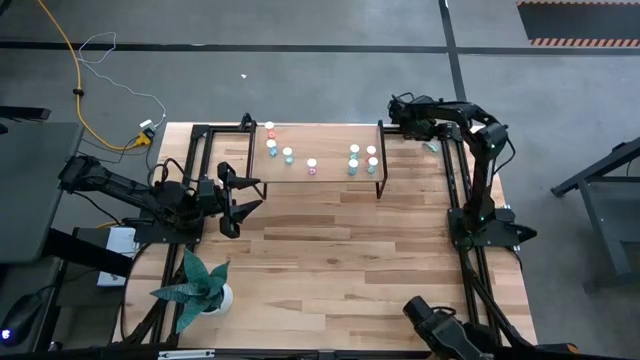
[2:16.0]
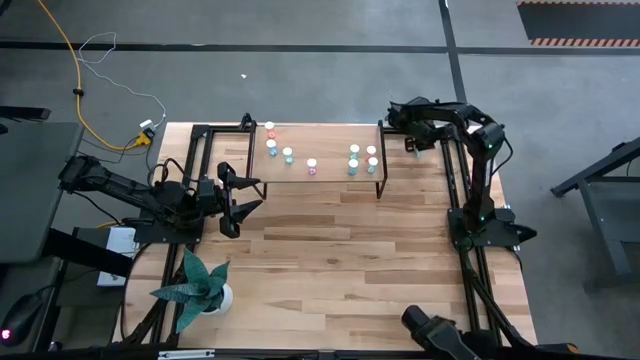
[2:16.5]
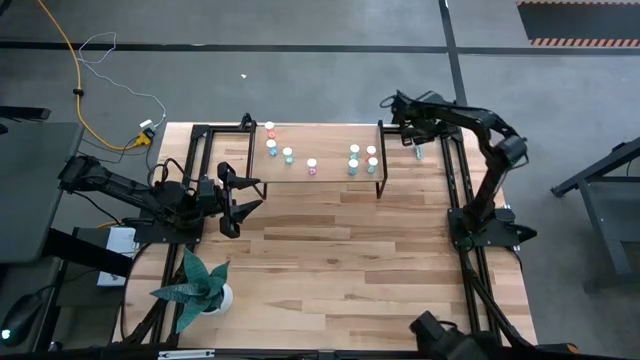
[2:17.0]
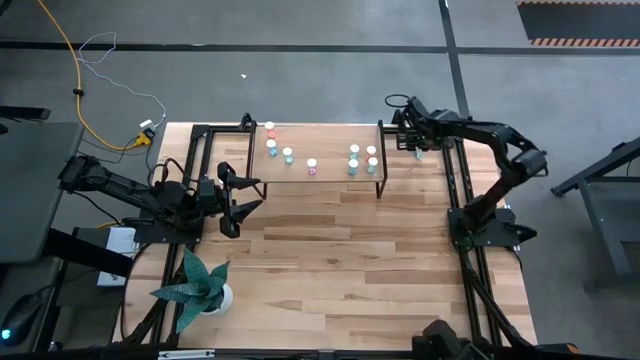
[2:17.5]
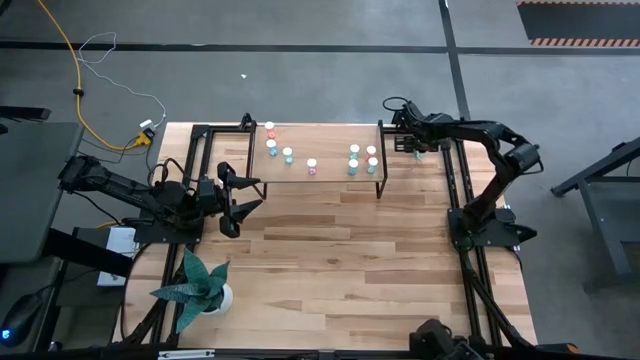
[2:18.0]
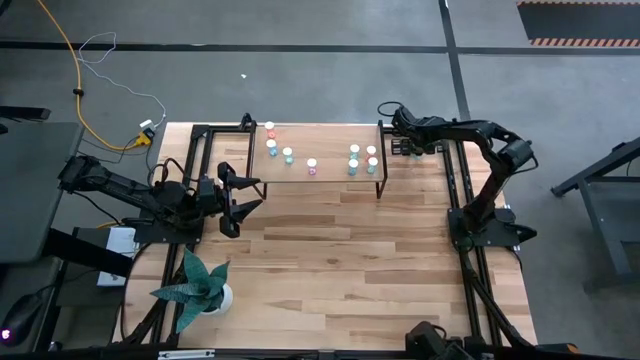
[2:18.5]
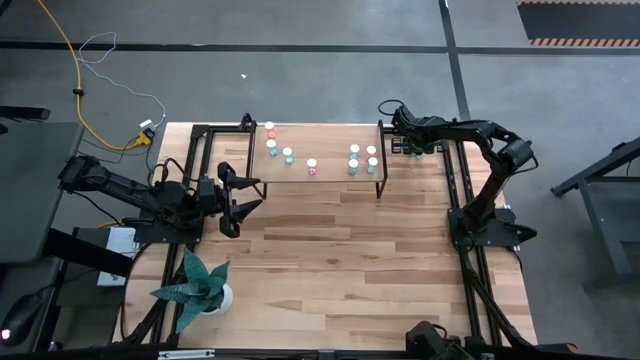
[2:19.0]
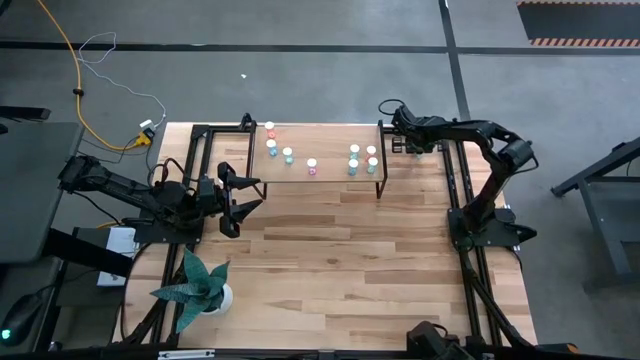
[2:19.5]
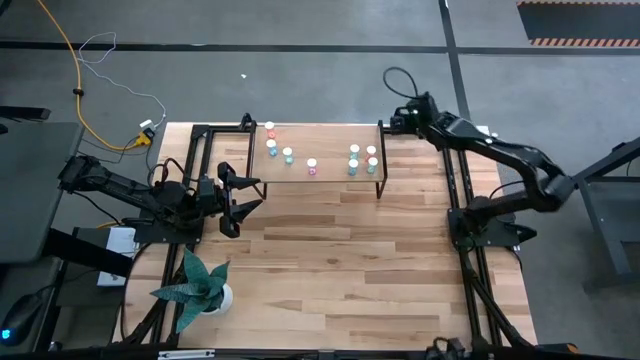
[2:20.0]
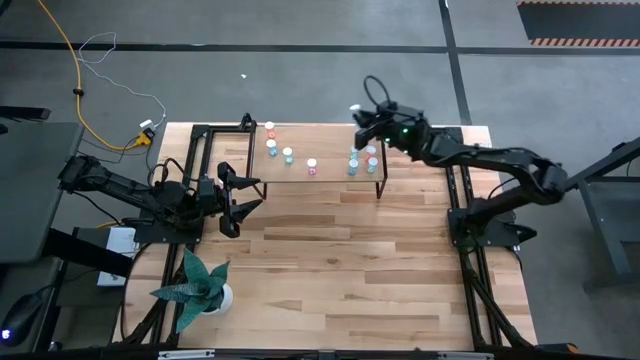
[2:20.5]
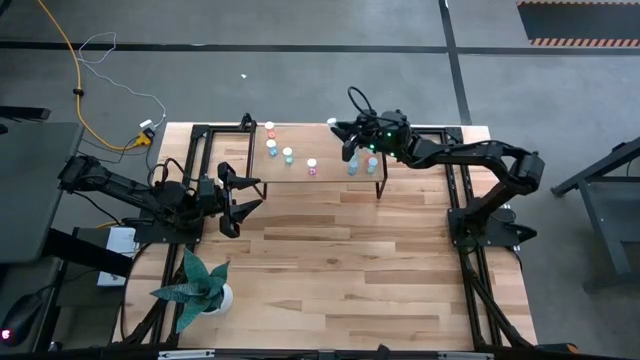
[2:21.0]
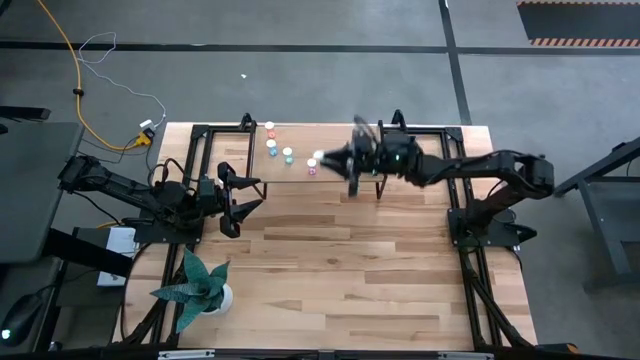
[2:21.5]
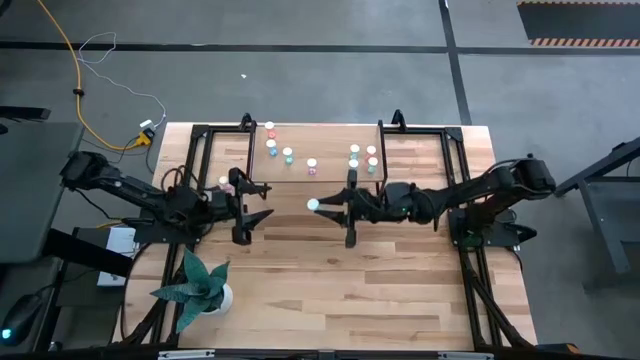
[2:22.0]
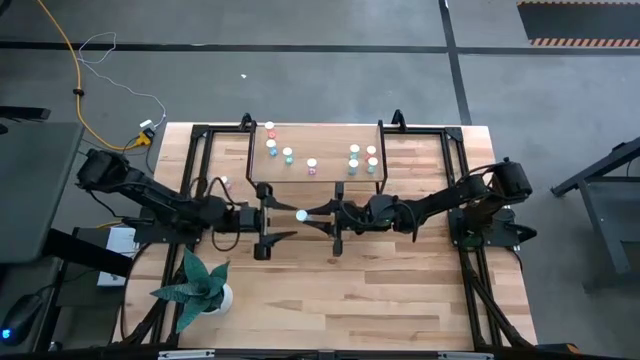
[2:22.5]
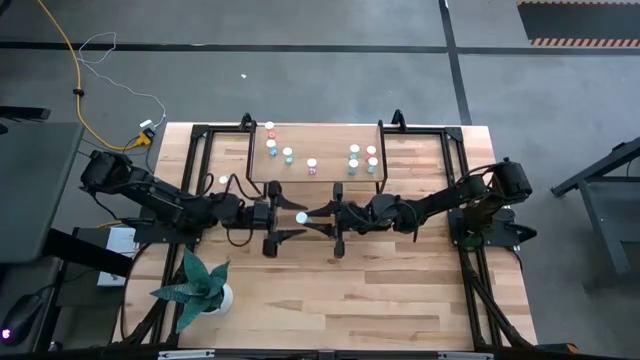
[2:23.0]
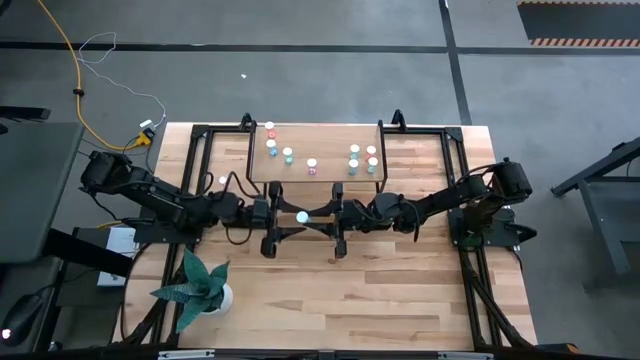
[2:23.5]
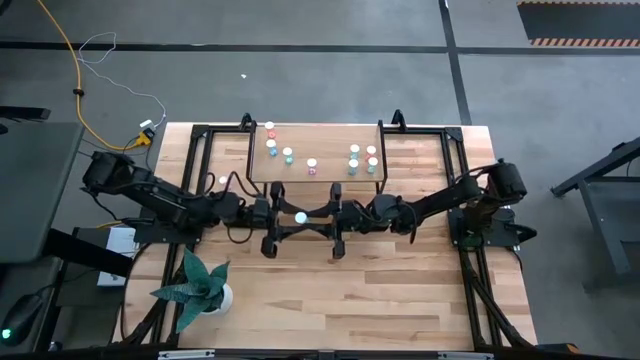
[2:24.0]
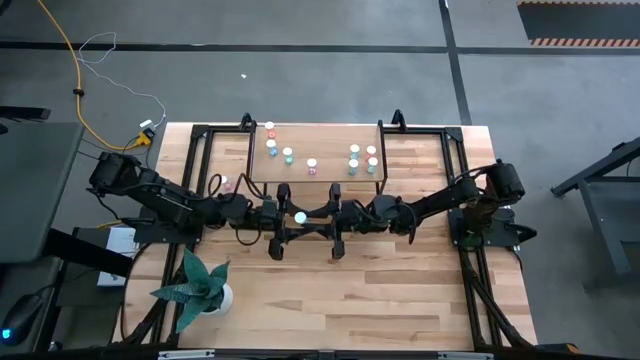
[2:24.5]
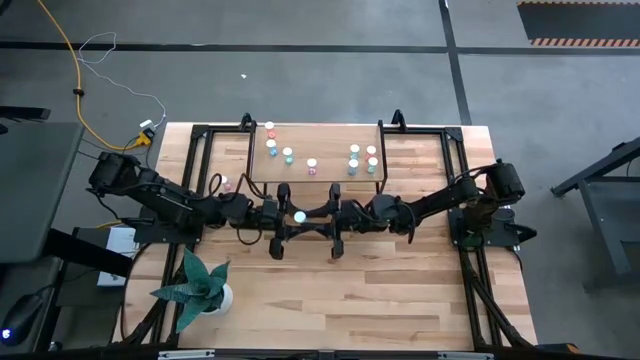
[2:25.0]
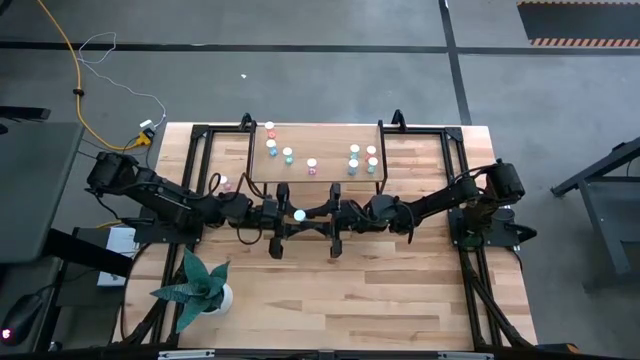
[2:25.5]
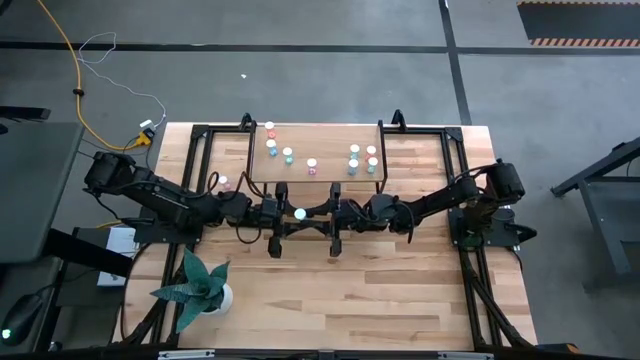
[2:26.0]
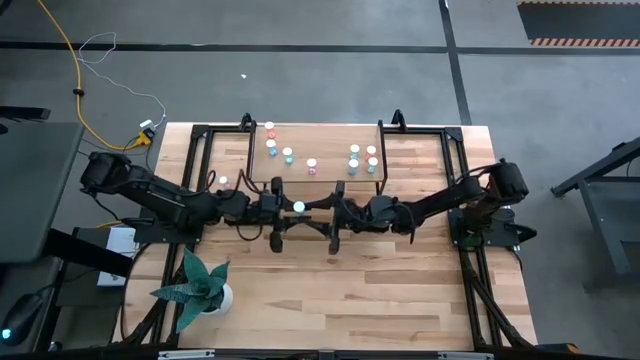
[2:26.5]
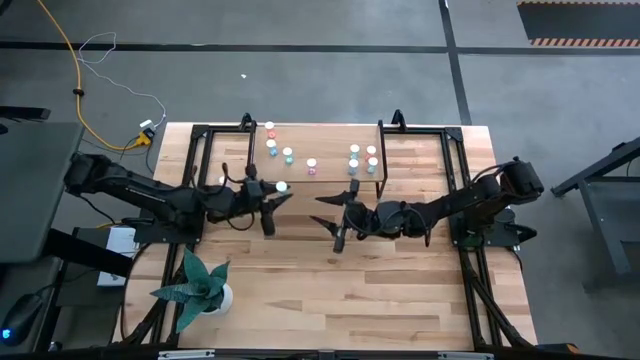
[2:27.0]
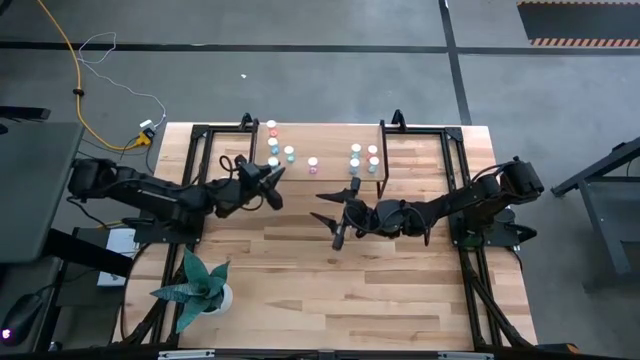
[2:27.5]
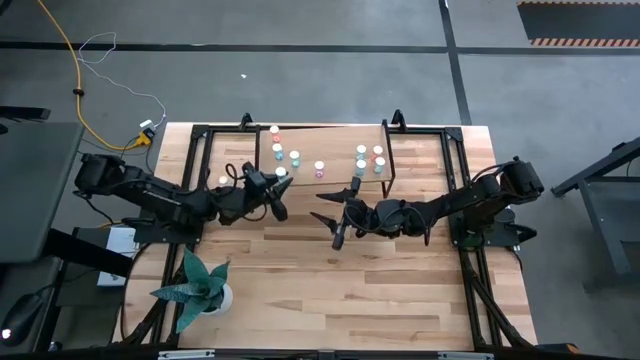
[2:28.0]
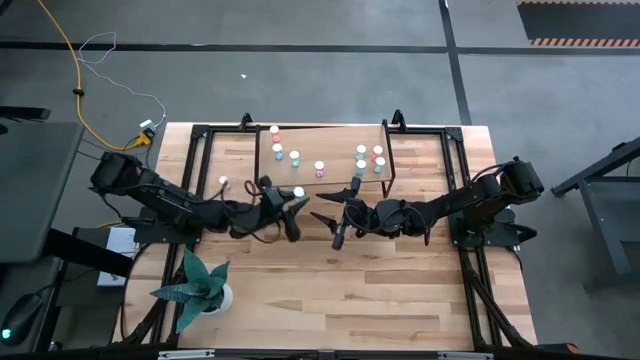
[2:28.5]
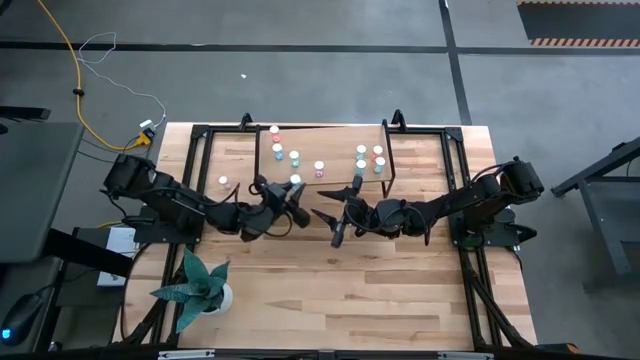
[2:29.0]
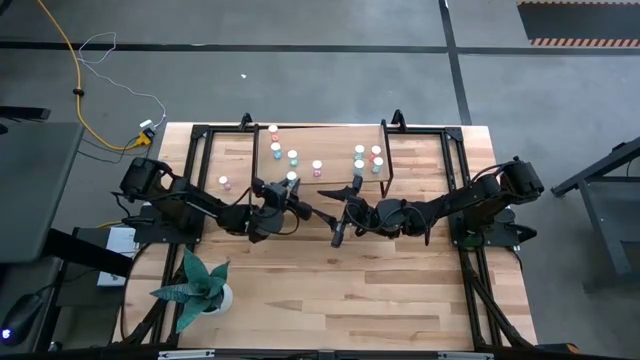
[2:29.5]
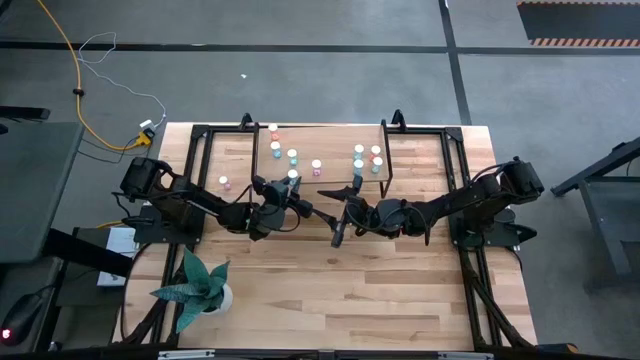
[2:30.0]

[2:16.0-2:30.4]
Task: Pick and place medicine bottles onto shelf by color
Put the green pill bottle on the shelf

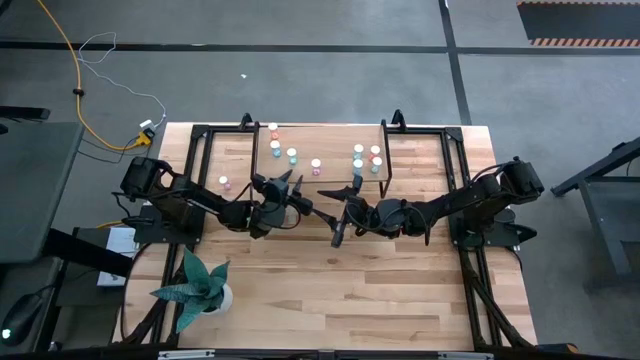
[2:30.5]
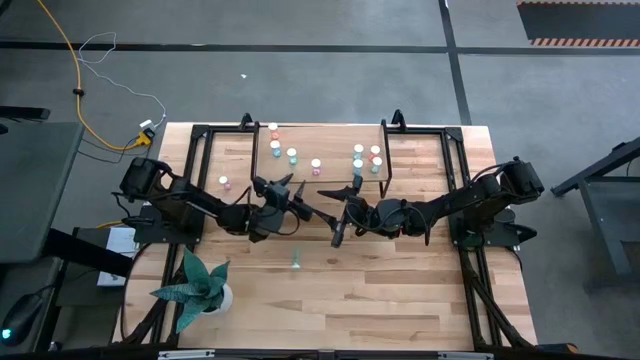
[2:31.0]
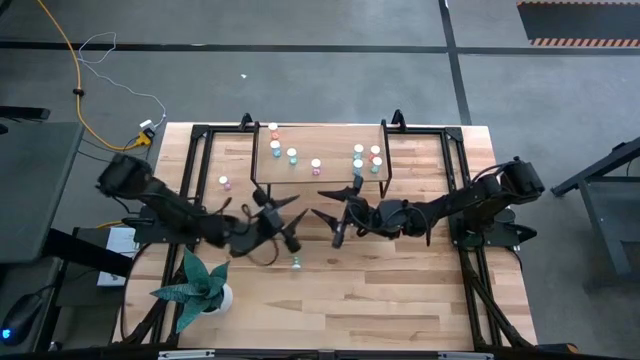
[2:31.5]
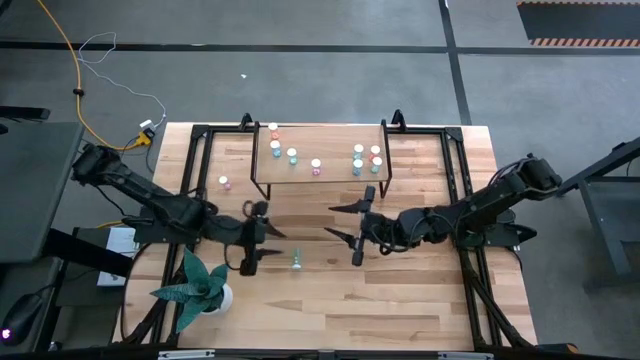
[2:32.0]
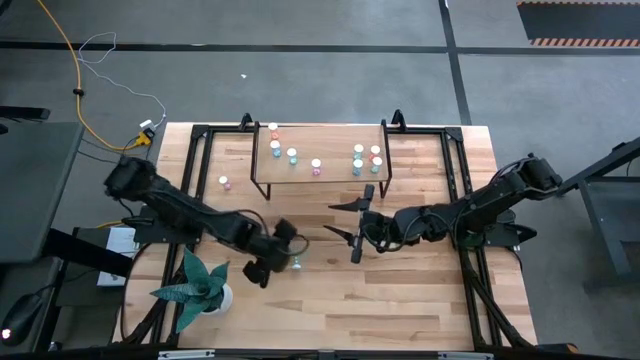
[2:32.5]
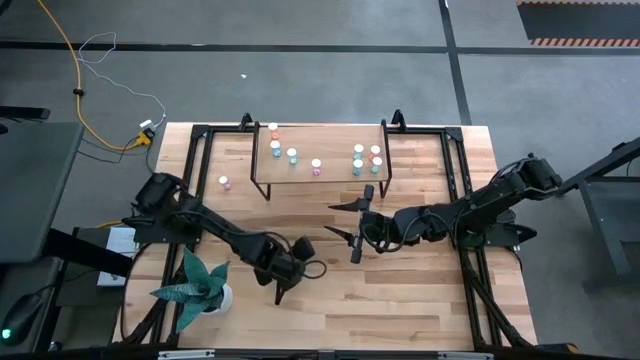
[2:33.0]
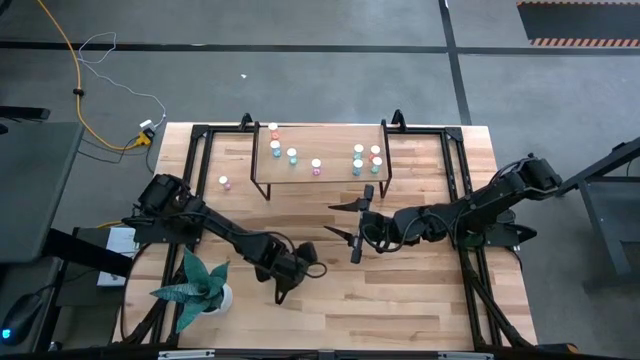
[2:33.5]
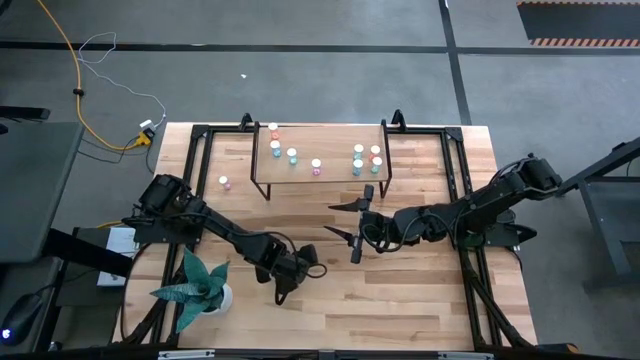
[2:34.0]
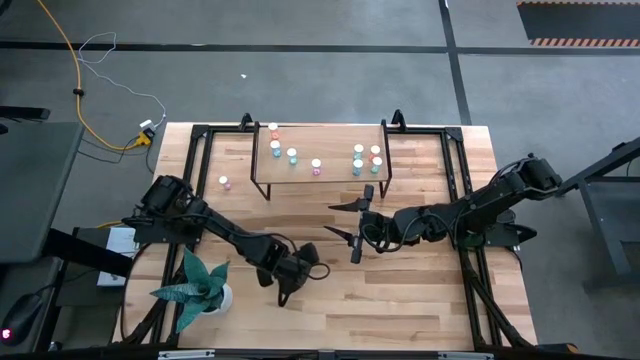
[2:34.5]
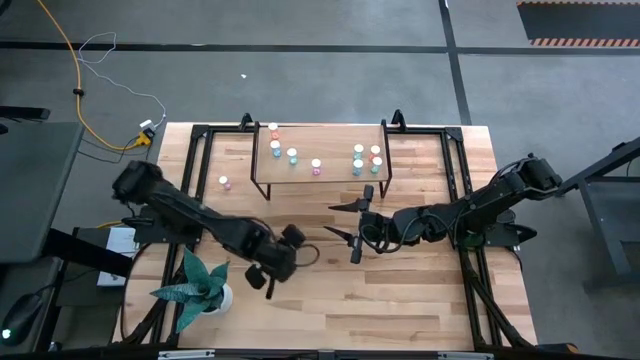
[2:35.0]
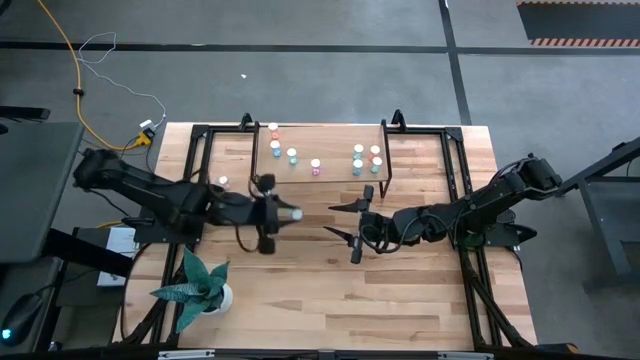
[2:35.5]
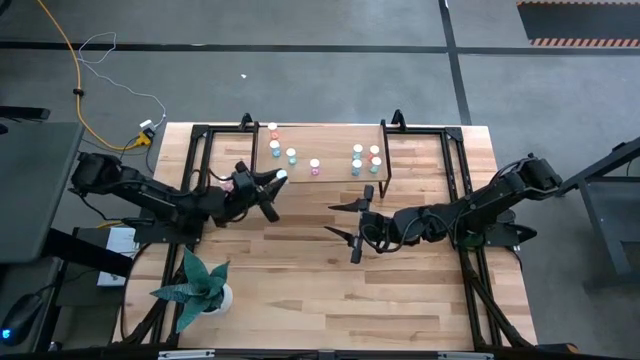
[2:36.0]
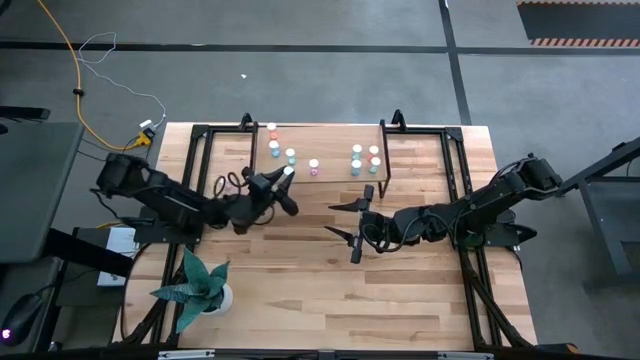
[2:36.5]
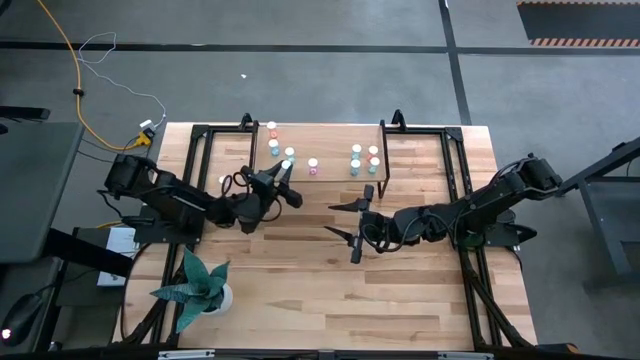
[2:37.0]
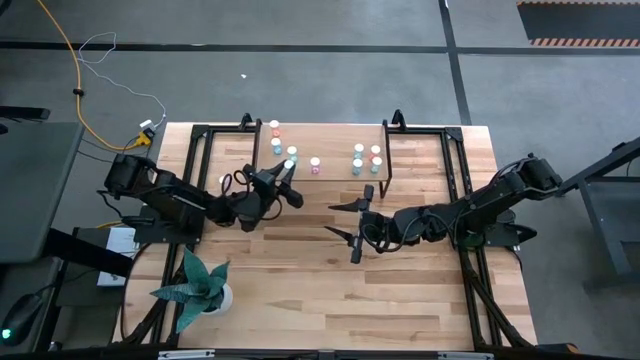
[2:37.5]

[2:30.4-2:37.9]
Put the green pill bottle on the shelf
